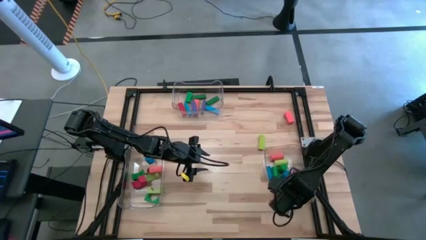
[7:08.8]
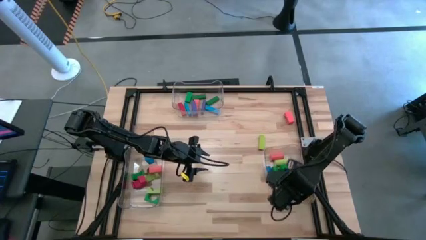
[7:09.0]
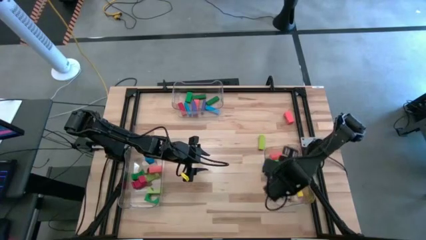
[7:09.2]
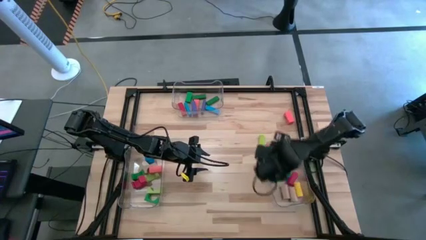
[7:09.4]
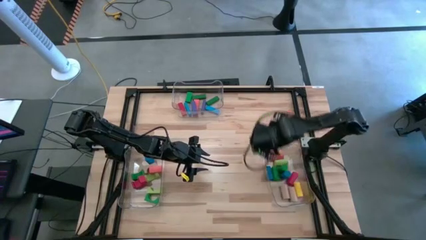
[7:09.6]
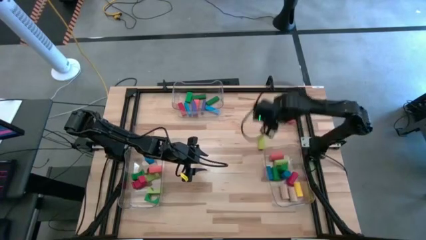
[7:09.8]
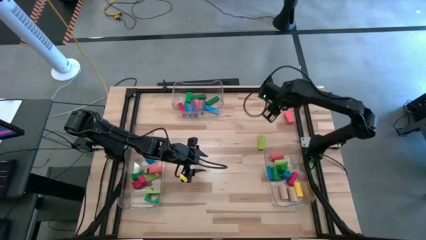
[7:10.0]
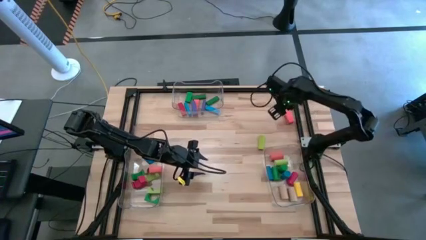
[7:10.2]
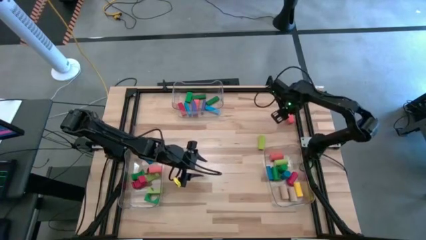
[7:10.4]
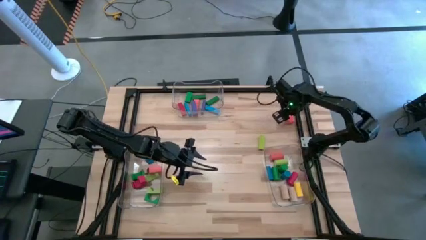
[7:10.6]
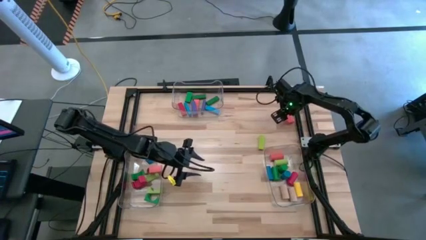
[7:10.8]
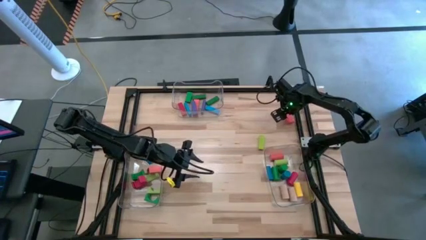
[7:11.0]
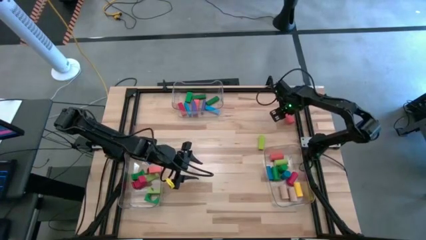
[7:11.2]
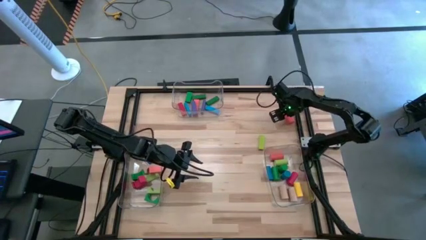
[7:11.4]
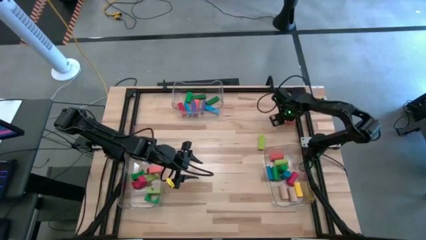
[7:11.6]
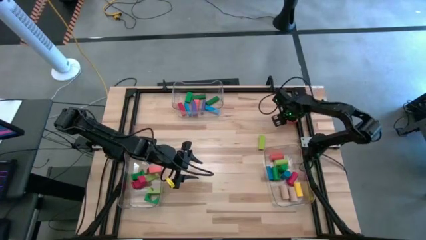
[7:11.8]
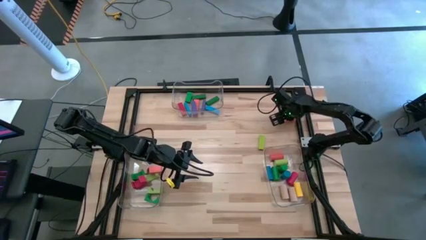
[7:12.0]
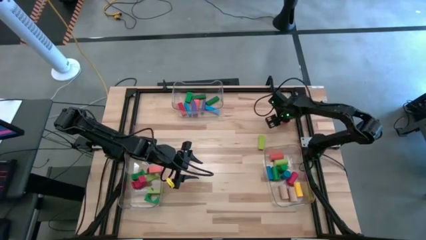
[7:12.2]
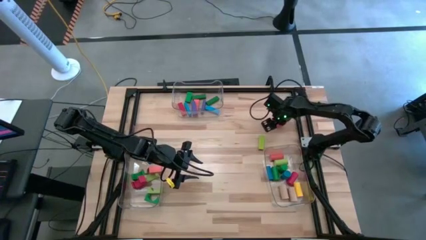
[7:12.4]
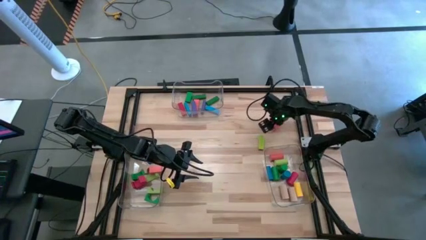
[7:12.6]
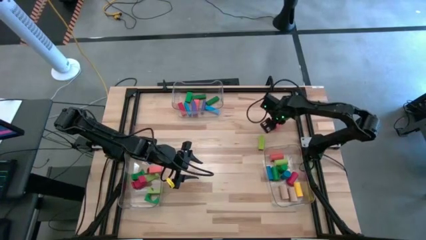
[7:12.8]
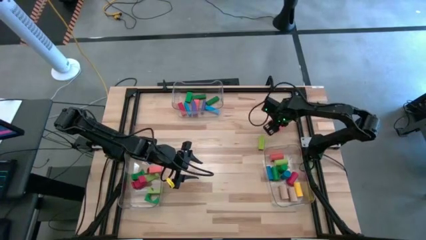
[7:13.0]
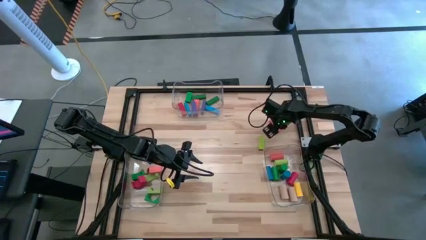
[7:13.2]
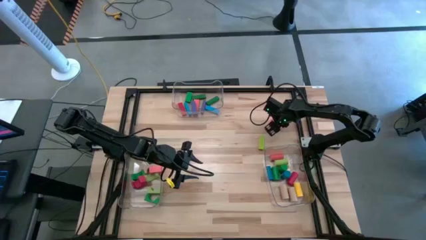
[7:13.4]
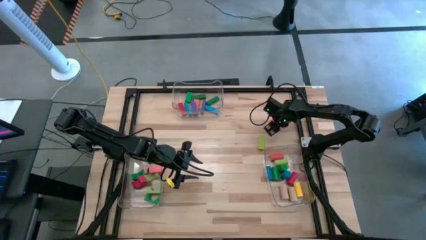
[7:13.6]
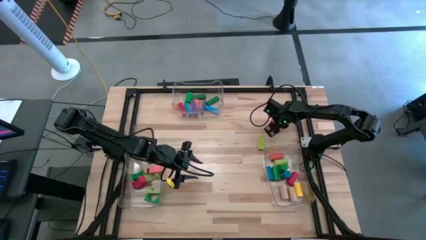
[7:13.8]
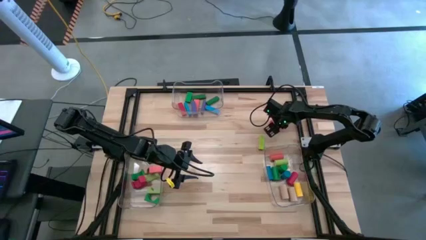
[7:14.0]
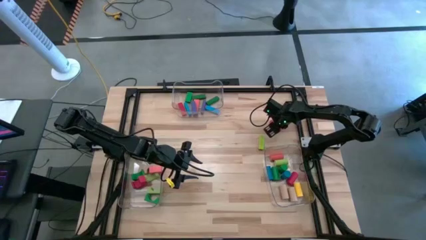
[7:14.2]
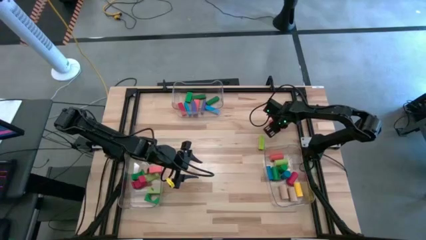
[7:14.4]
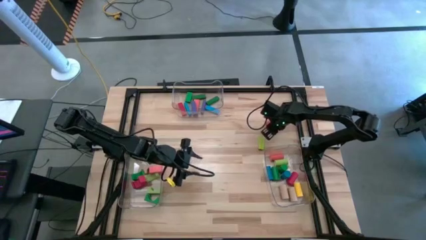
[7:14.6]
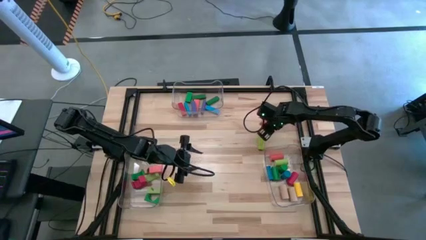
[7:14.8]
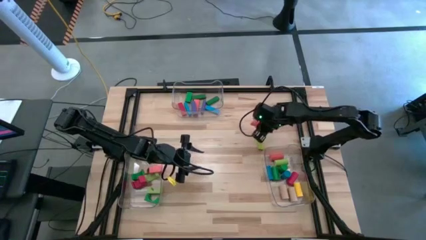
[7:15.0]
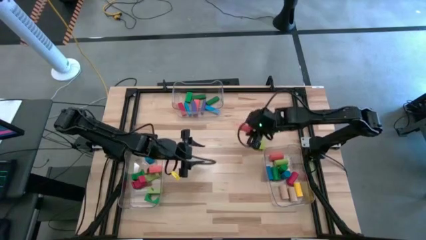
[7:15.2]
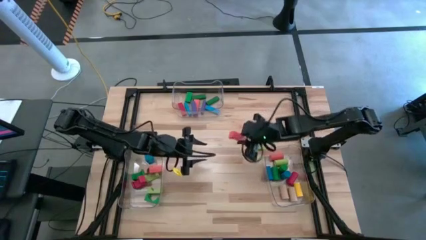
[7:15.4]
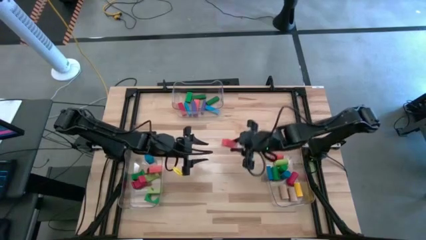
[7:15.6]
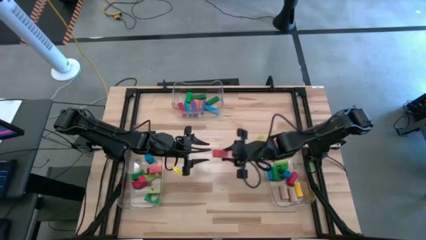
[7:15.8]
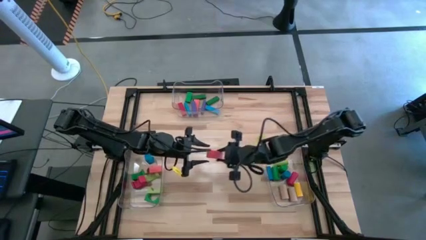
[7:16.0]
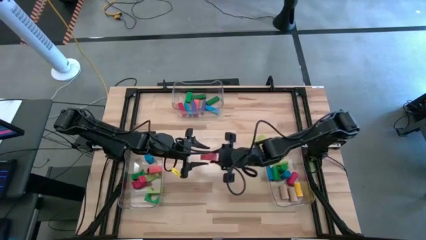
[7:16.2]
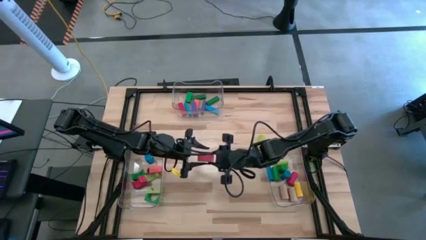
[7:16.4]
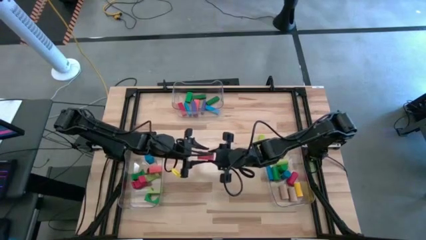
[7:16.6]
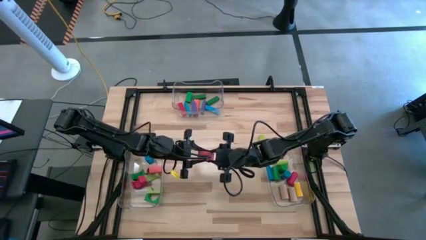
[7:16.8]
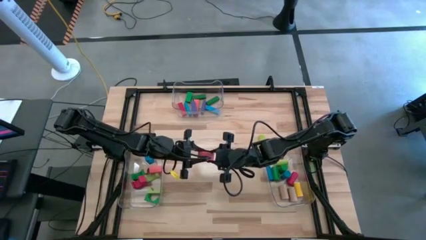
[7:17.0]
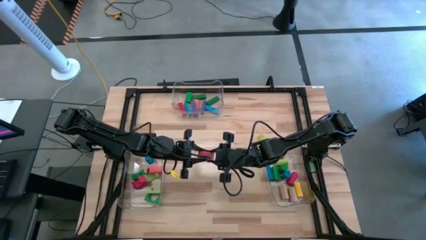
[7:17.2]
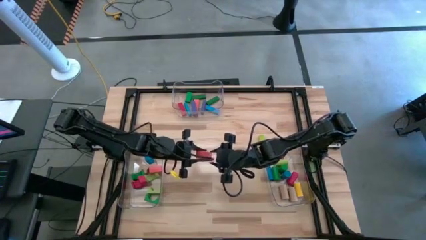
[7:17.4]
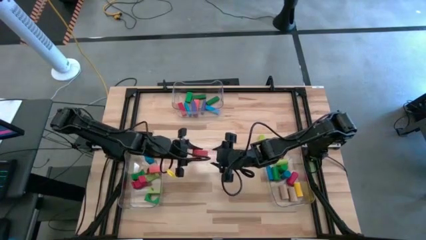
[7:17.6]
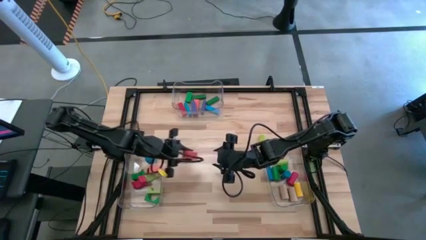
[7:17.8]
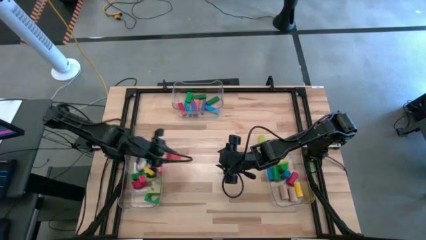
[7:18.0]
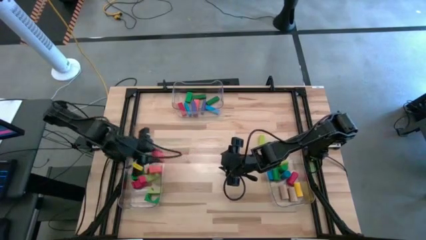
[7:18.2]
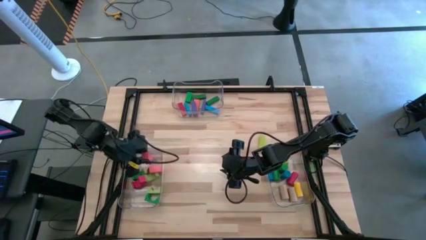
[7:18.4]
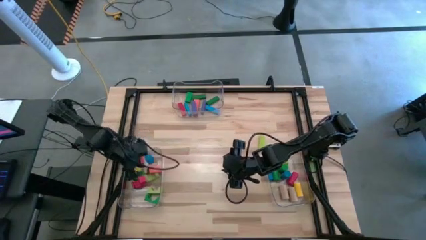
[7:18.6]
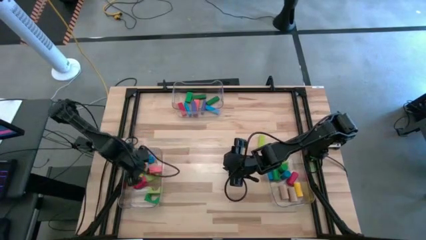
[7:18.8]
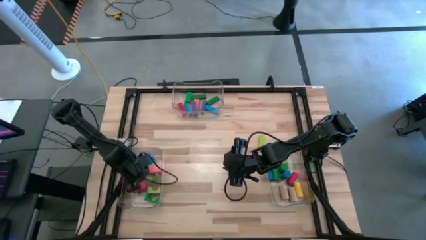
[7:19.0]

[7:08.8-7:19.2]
Task: Sort blocks by size
Put the orange arc block into the left transparent bin
